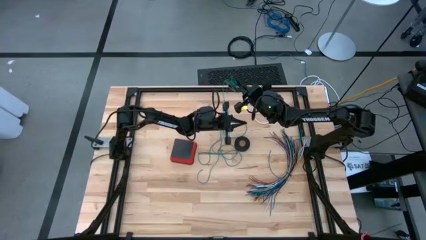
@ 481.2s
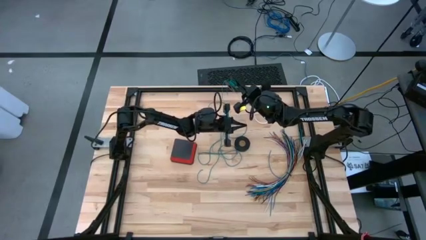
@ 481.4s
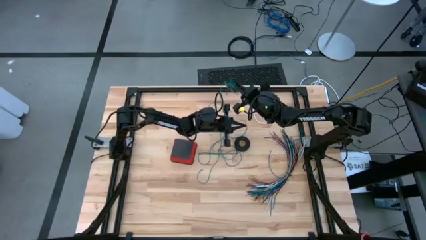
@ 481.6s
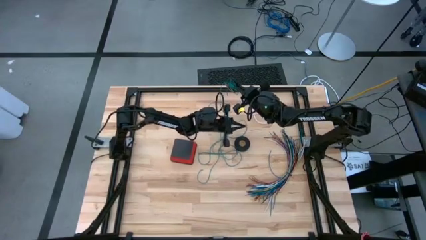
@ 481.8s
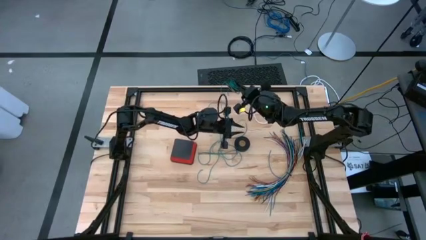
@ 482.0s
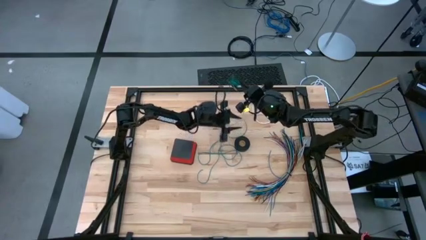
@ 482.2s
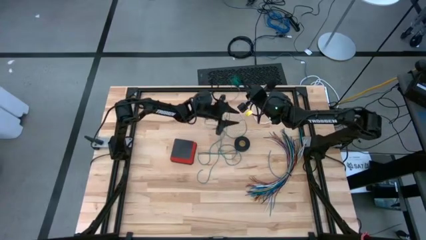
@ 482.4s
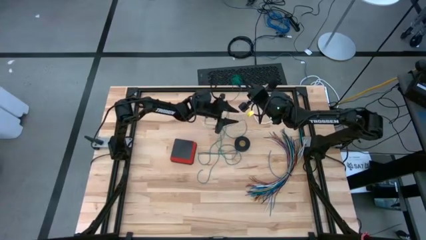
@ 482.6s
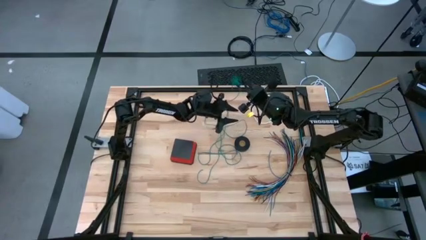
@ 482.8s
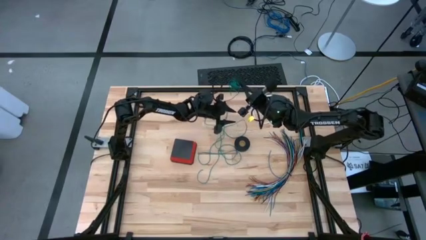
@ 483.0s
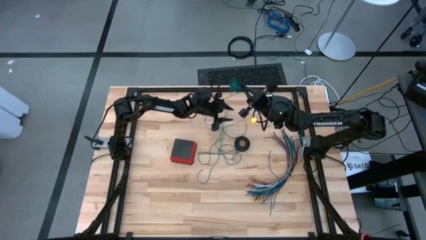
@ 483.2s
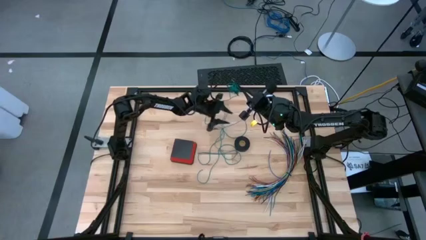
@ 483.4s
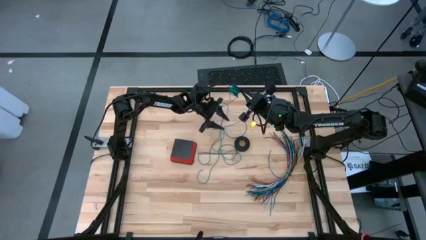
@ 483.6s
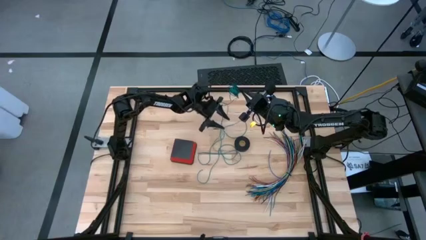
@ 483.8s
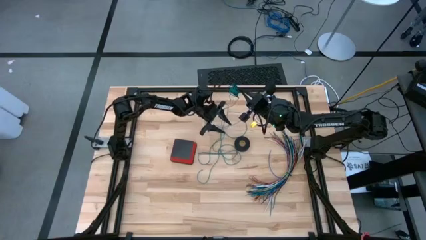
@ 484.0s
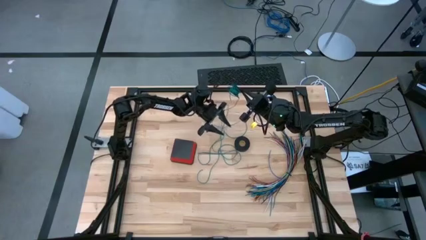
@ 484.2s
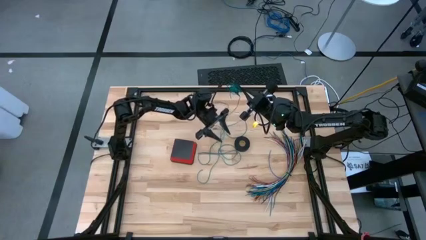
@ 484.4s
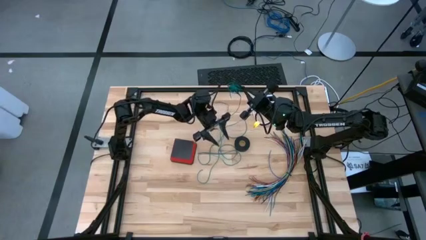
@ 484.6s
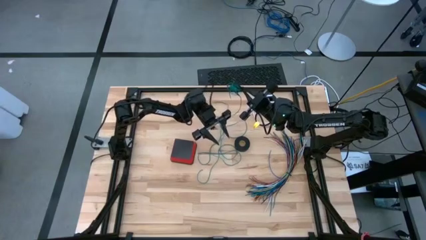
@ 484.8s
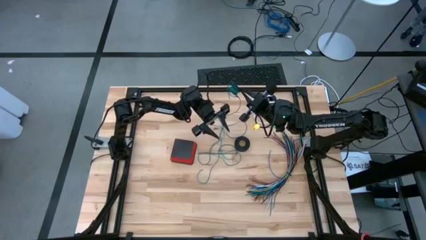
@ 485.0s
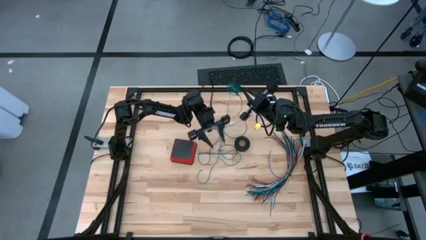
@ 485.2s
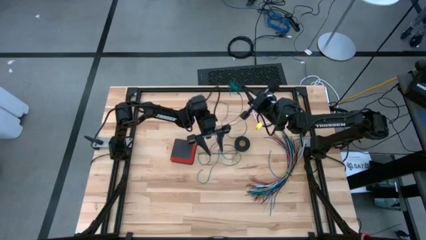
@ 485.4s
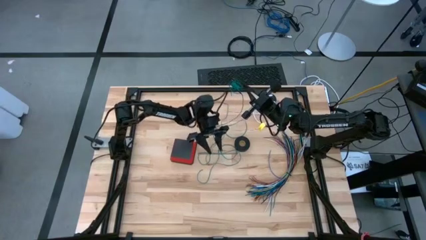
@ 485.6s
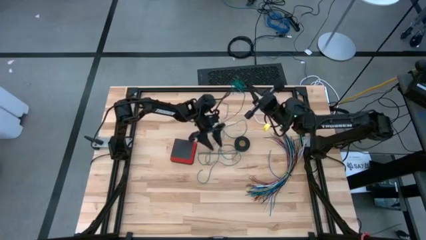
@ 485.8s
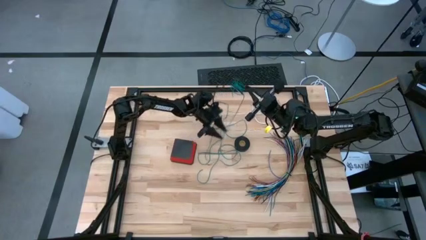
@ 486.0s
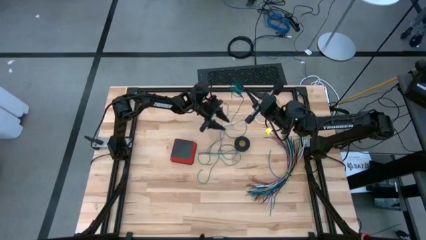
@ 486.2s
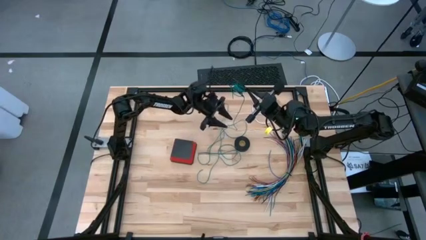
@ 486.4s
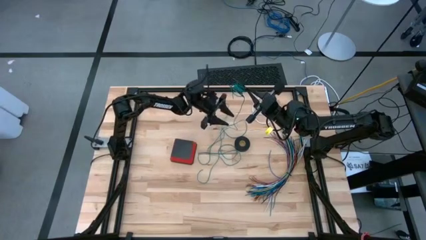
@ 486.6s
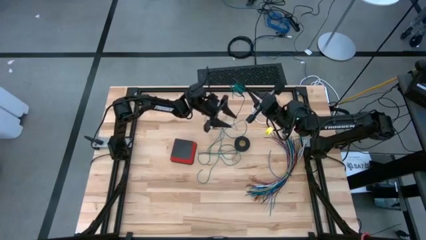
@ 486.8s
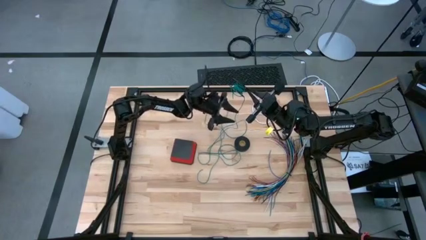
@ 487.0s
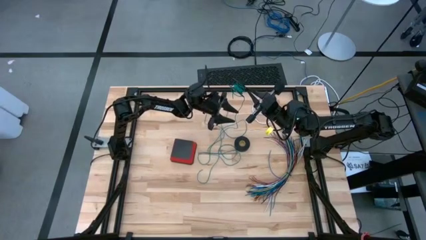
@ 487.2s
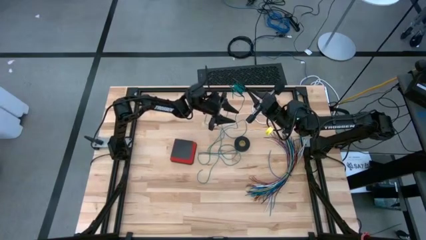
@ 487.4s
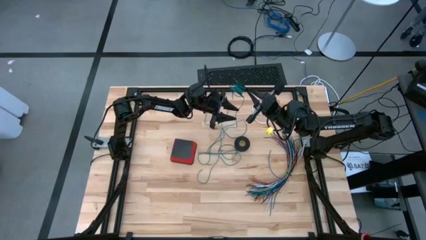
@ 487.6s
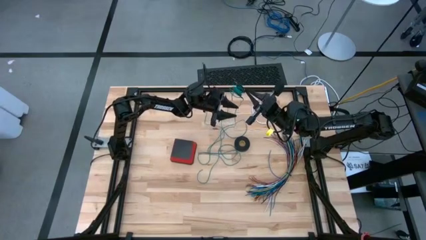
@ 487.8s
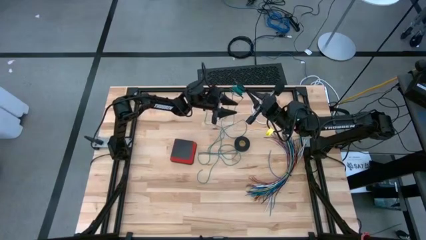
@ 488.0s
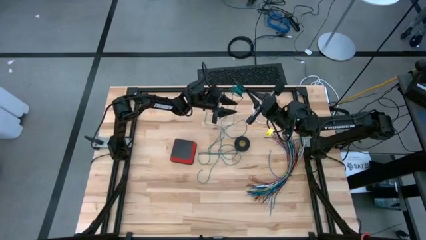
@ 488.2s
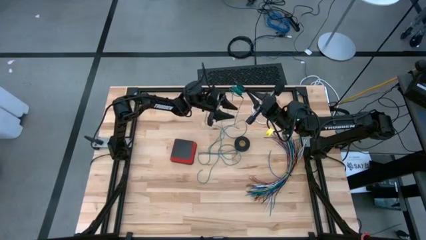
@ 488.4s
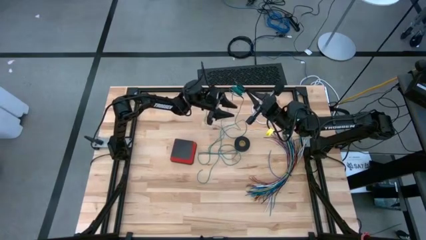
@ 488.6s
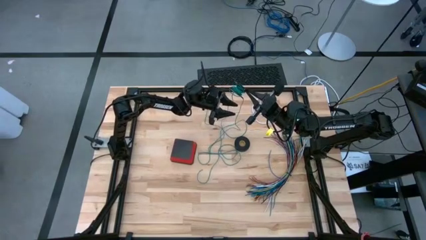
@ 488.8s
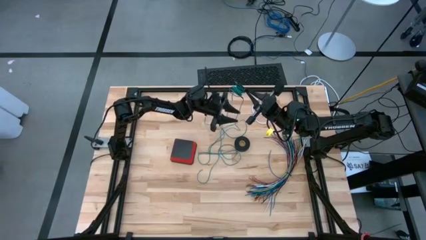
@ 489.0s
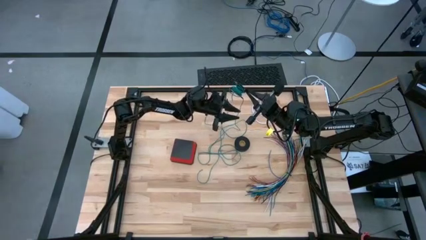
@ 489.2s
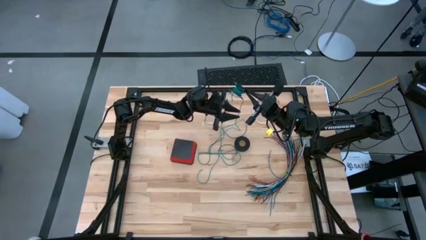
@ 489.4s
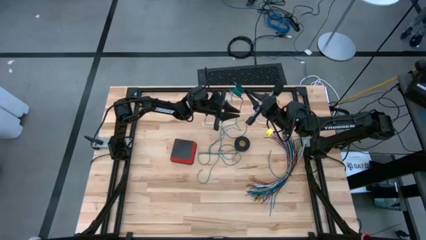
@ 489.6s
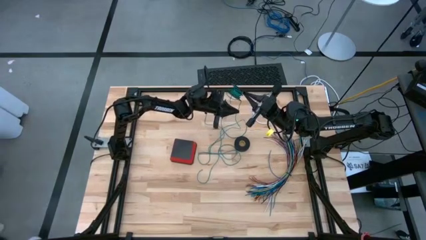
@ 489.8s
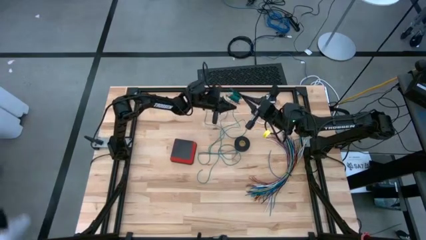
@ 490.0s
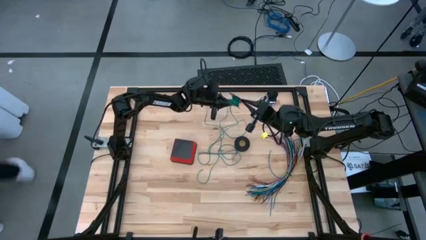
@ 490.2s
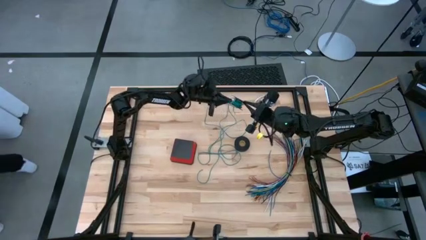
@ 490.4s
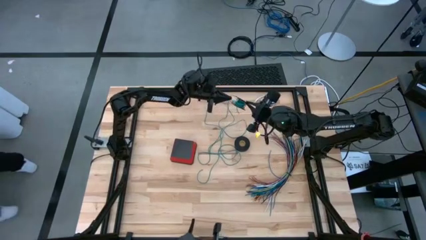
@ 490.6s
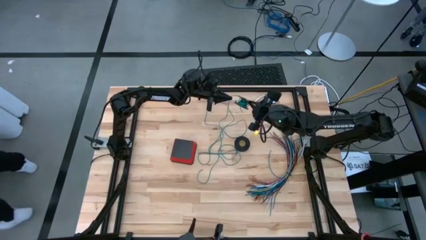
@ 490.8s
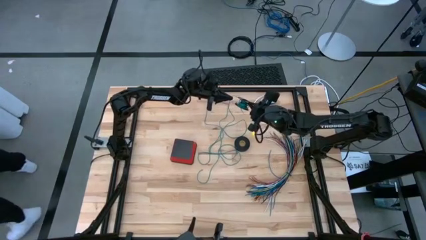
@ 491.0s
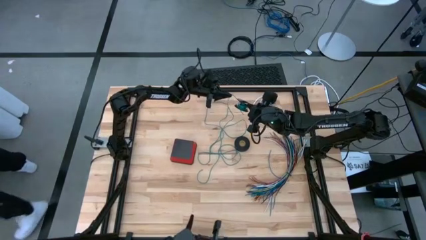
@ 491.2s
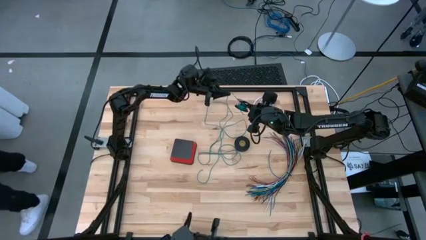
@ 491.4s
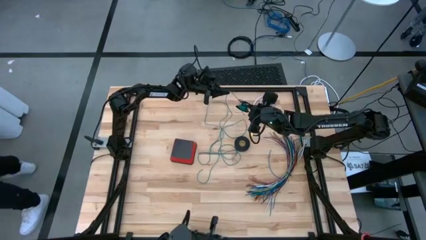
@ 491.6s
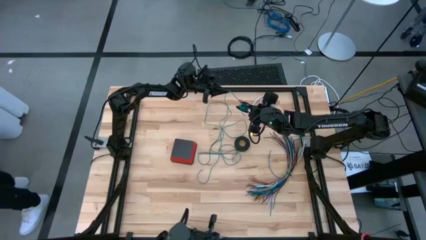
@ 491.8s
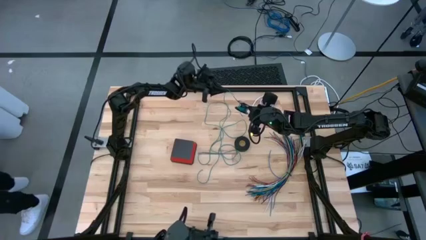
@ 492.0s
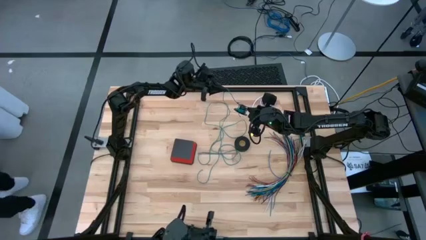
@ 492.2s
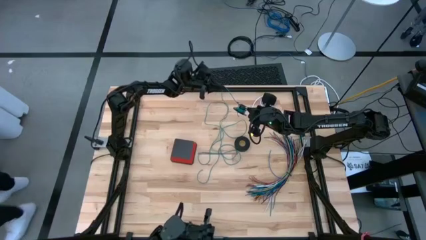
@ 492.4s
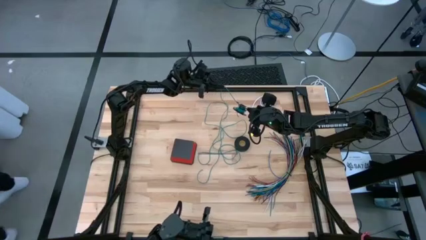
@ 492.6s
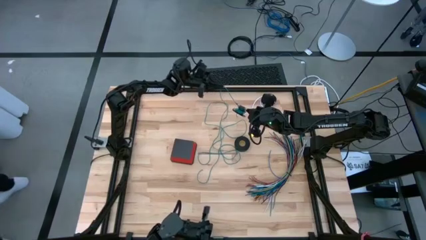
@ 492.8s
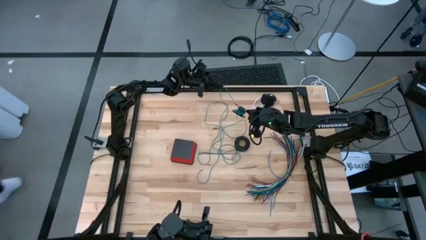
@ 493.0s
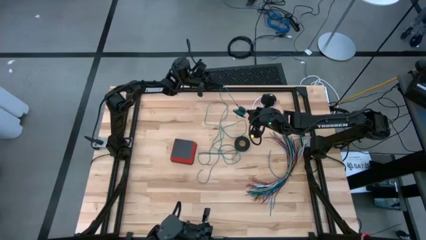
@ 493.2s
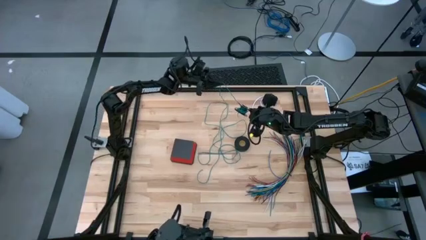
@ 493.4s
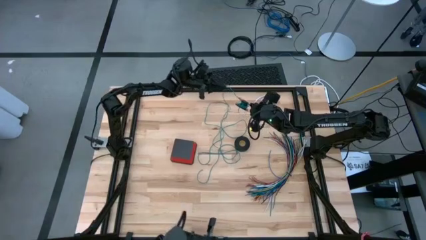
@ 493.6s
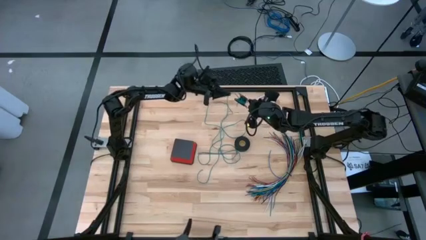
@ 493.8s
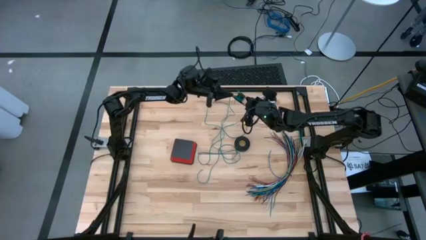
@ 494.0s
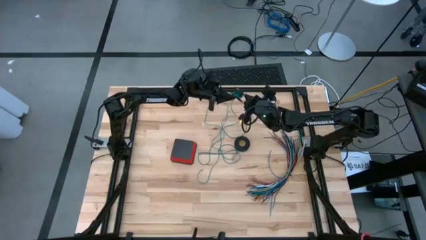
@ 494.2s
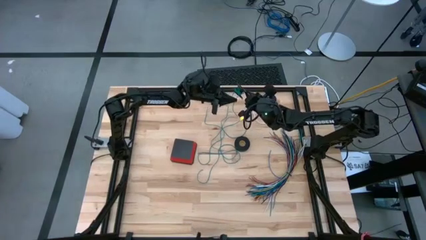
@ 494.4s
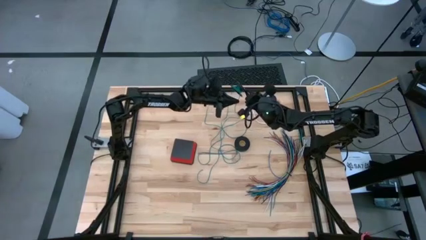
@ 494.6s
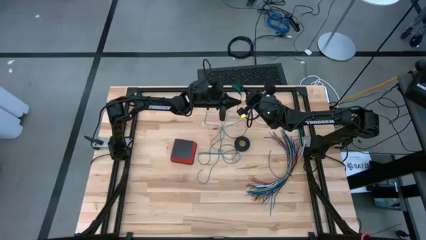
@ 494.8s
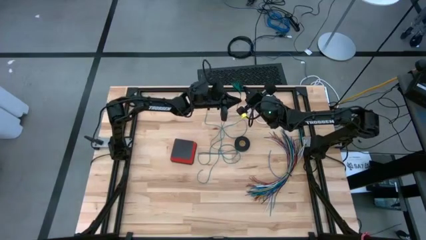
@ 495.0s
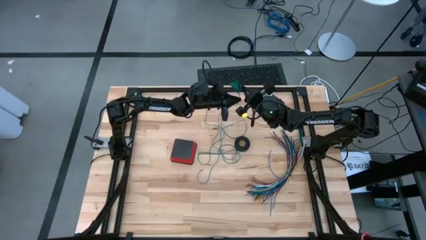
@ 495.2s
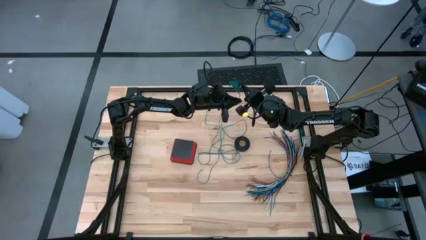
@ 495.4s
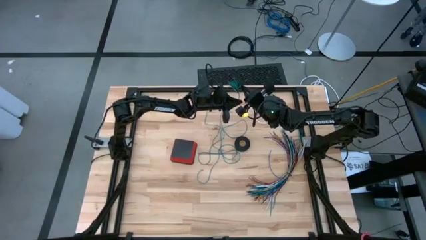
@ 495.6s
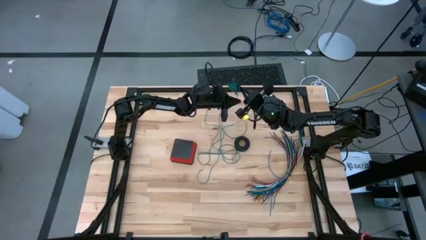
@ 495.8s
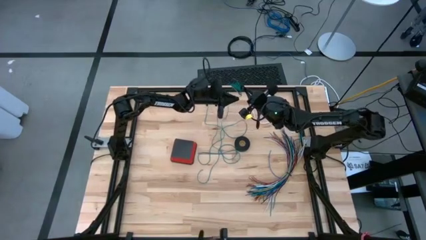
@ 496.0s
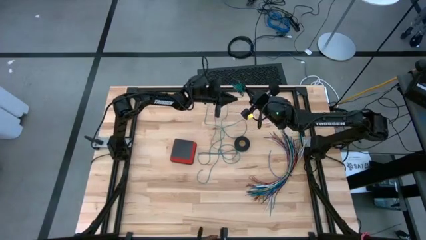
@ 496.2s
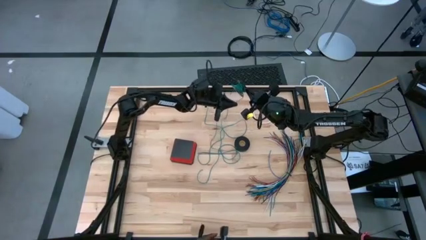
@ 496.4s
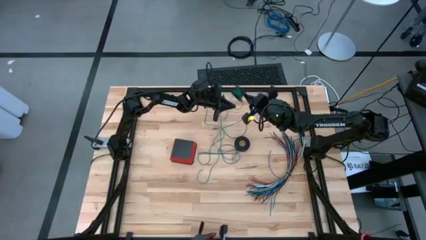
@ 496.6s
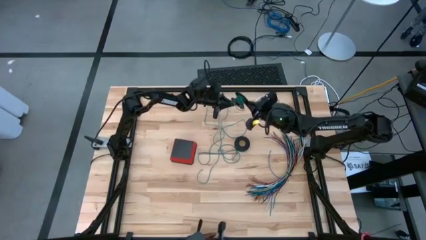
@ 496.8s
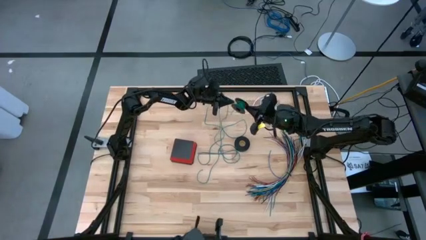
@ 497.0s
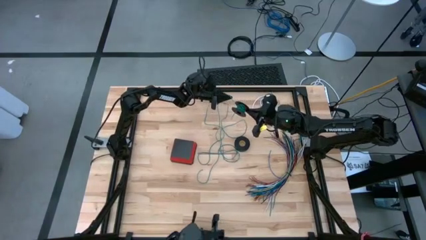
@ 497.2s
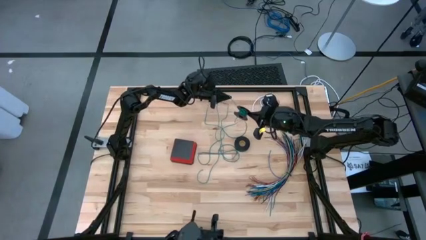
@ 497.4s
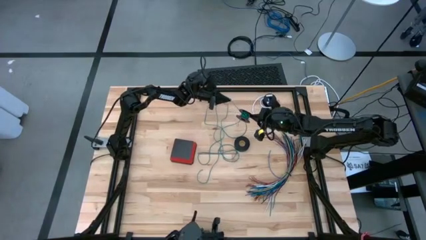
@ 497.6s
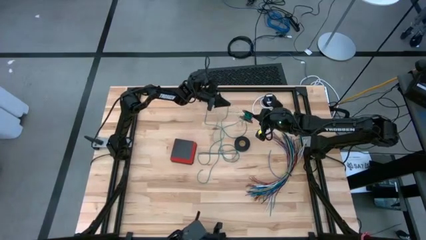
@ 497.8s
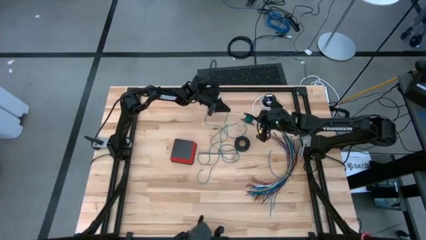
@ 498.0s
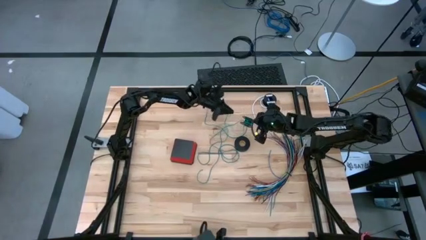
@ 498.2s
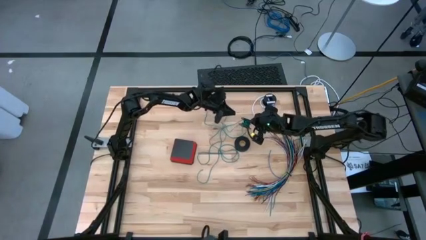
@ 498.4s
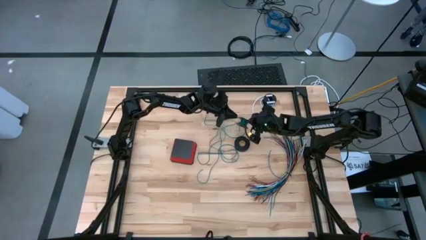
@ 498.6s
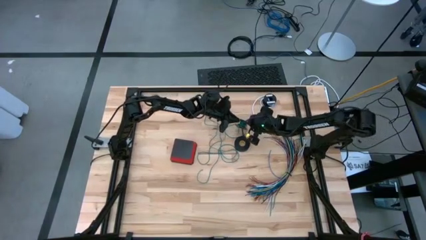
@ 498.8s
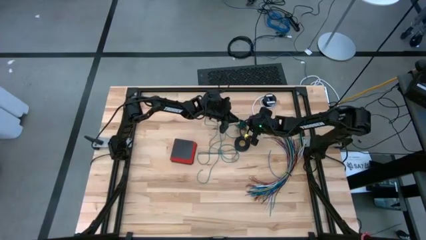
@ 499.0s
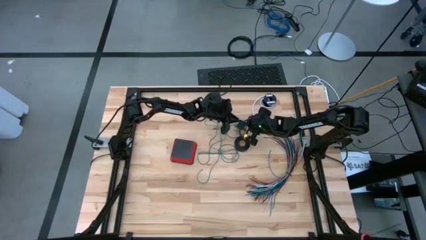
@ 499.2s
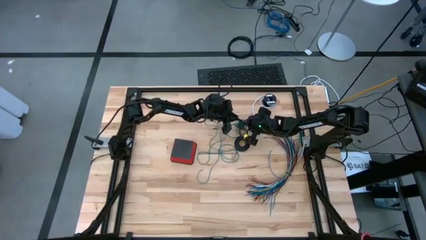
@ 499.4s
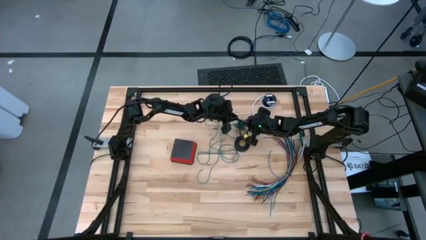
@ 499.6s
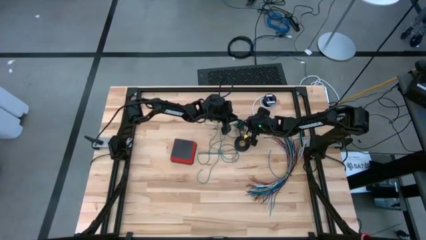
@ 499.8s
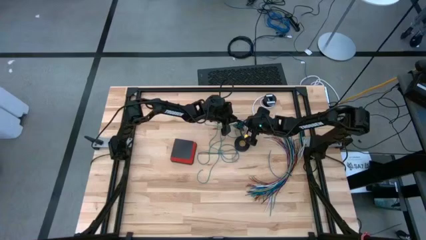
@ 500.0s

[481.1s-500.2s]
Task: Coiling cords
Coil the green wire cable on the spool
